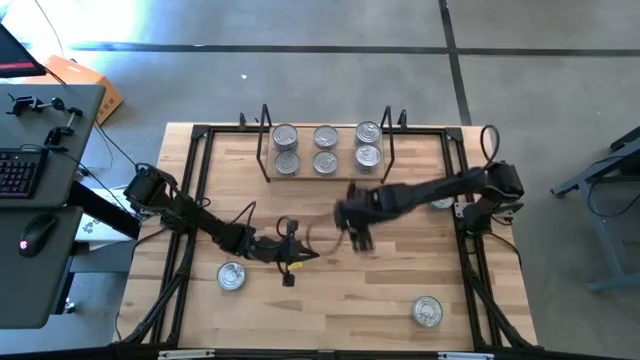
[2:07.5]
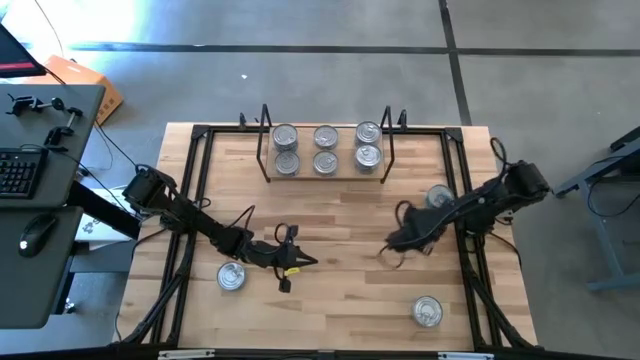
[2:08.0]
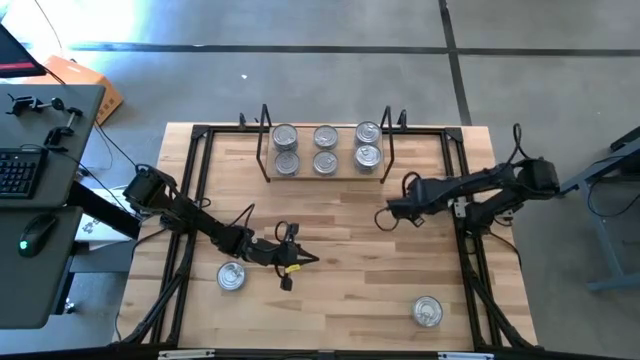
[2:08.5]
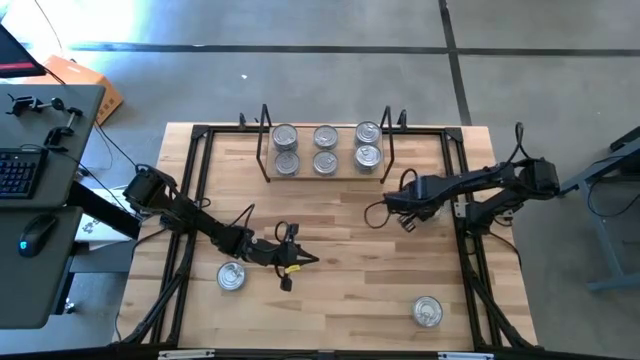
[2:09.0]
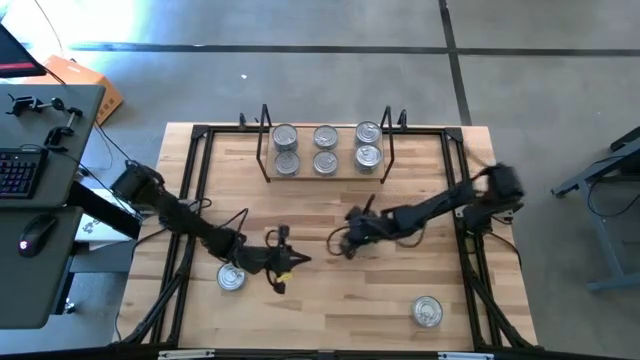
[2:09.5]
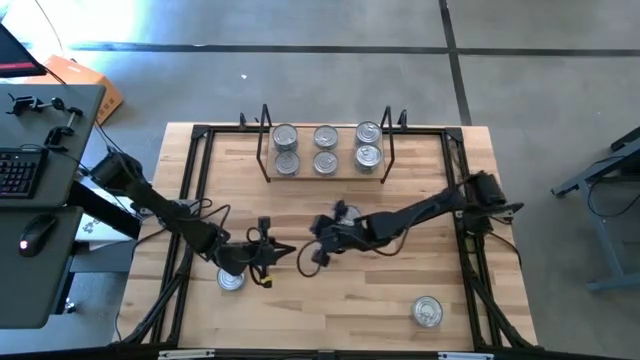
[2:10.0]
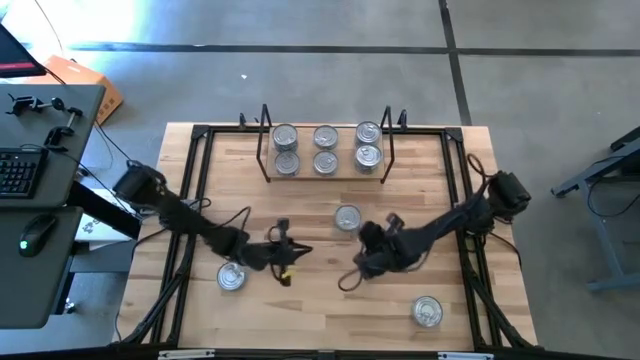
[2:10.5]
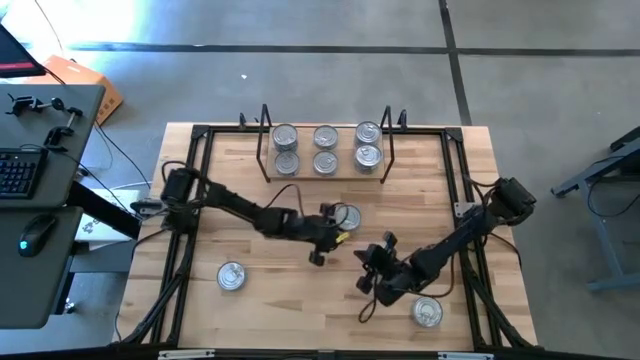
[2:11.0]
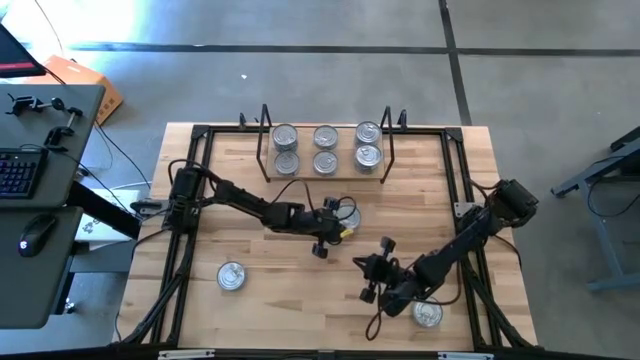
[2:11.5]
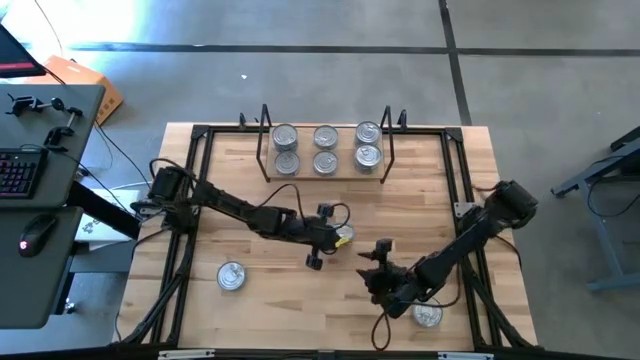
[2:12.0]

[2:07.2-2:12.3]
Task: Stack canned seafood by type on shelf
Stack the yellow and blue tuna can on top of the other yellow and blue tuna can on the shelf

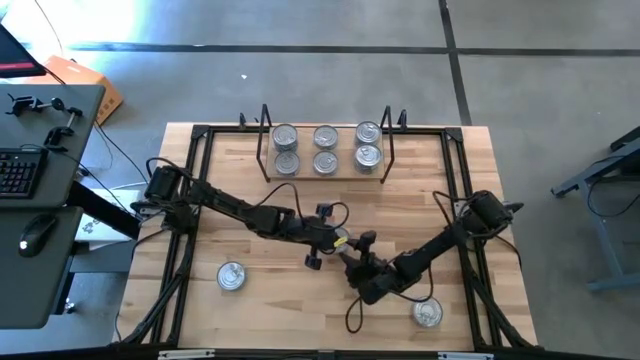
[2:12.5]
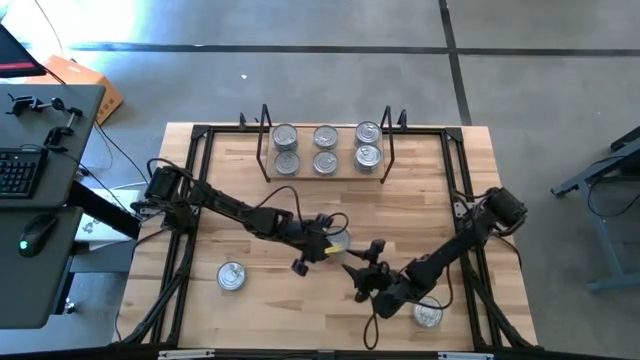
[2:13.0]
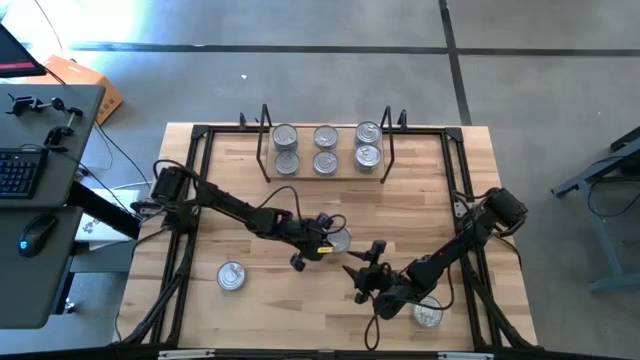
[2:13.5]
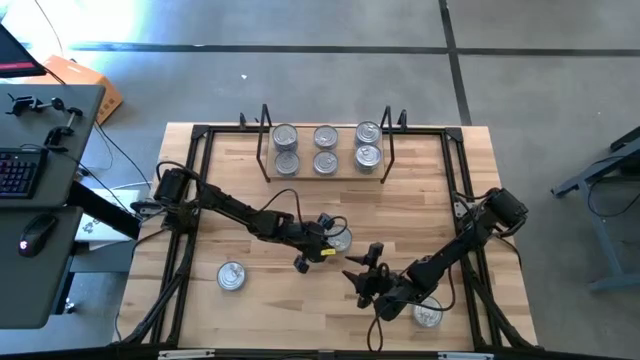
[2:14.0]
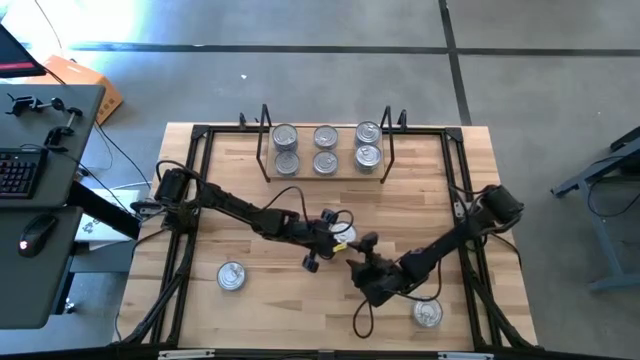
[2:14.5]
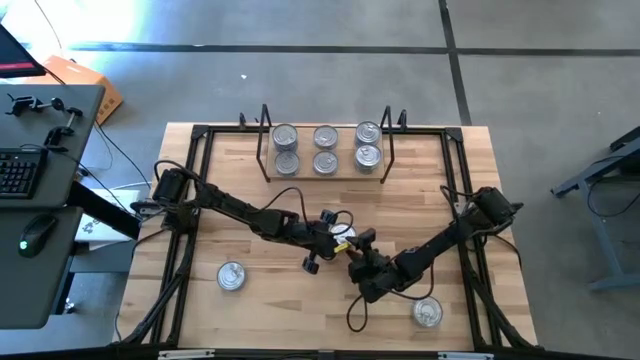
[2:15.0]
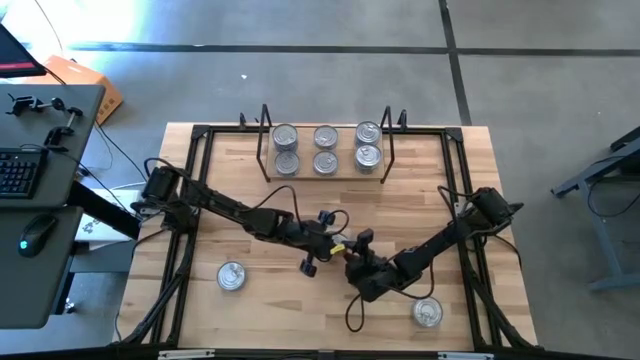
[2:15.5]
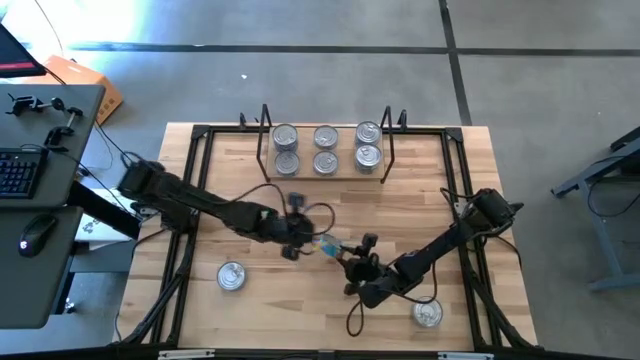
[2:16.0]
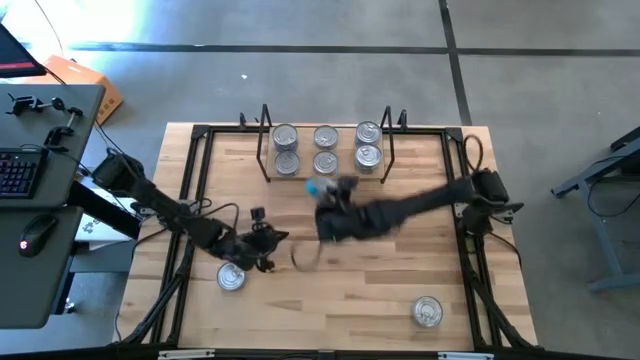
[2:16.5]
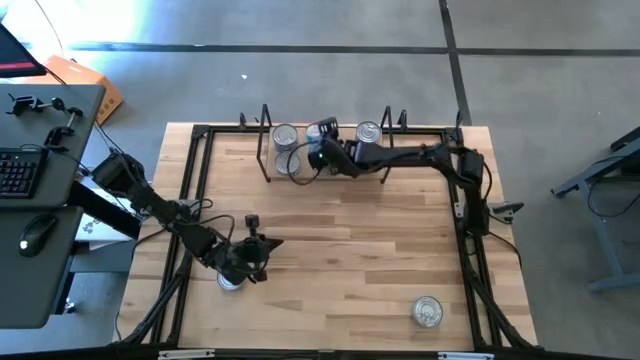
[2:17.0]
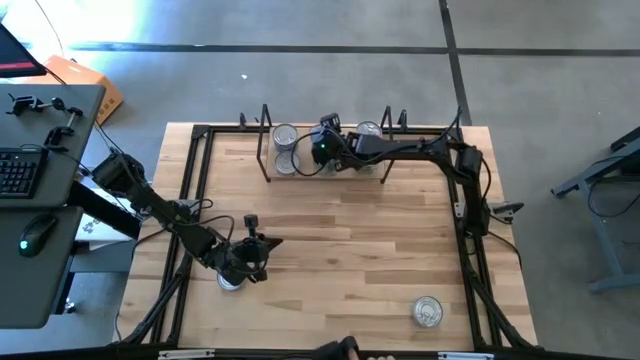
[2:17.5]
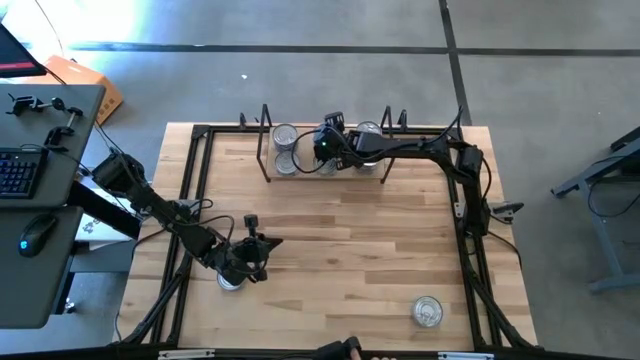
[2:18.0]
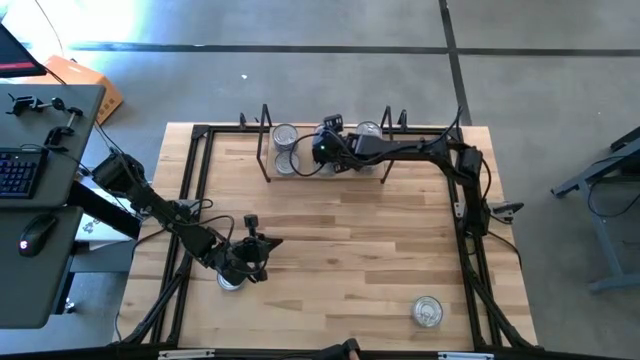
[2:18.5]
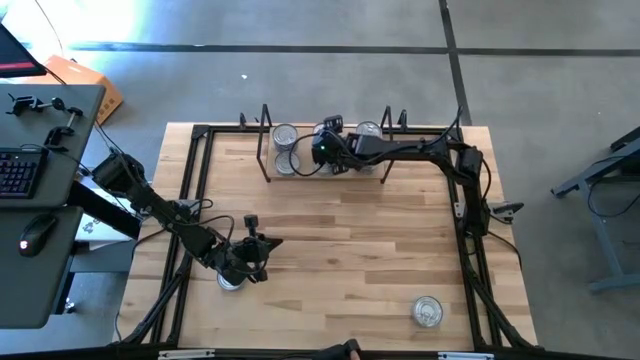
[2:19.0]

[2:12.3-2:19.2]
Stack the yellow and blue tuna can on top of the other yellow and blue tuna can on the shelf

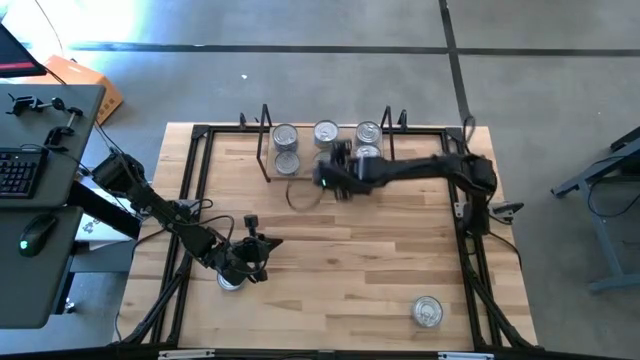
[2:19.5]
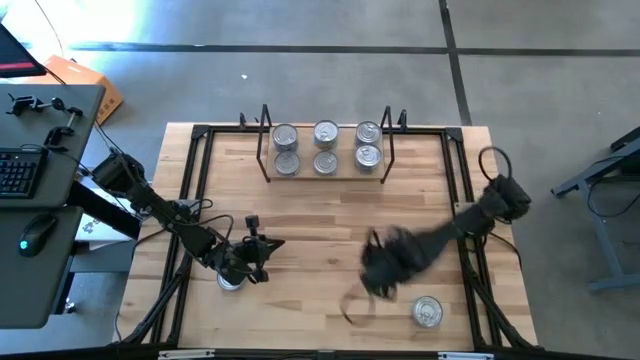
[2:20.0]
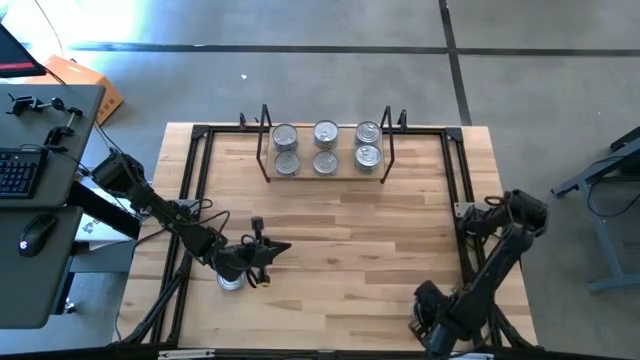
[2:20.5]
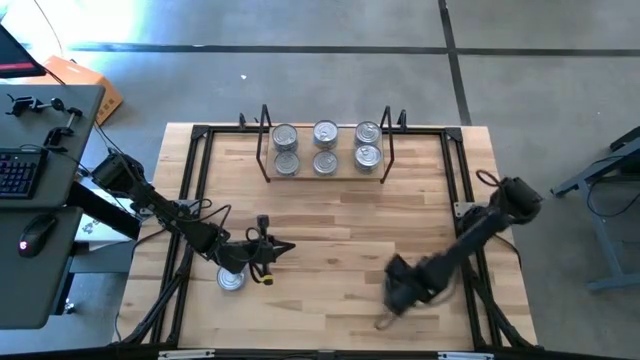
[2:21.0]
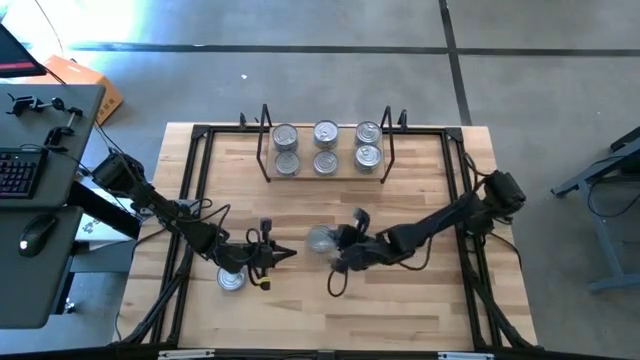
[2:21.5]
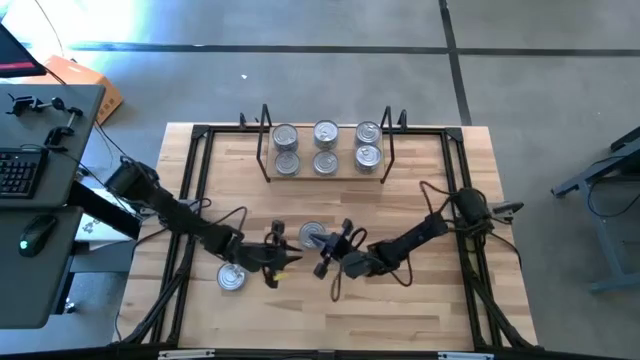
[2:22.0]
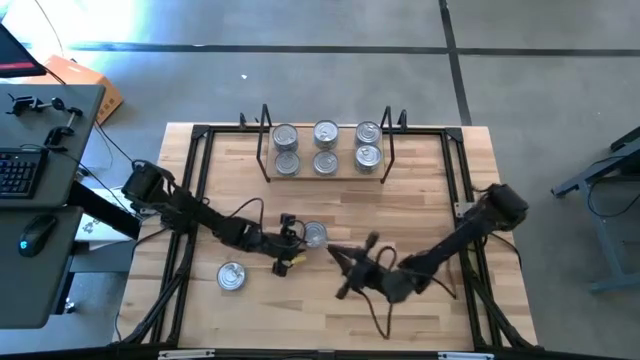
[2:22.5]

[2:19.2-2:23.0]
Stack the yellow and blue tuna can on top of the other yellow and blue tuna can on the shelf

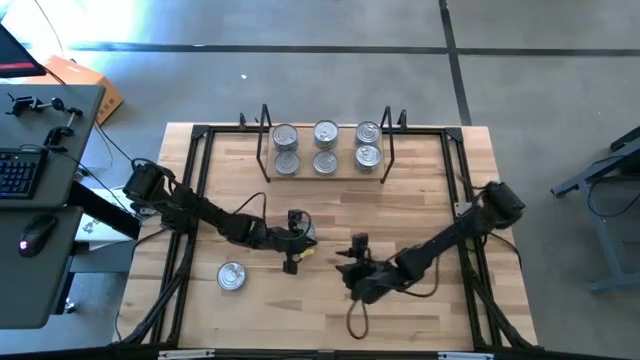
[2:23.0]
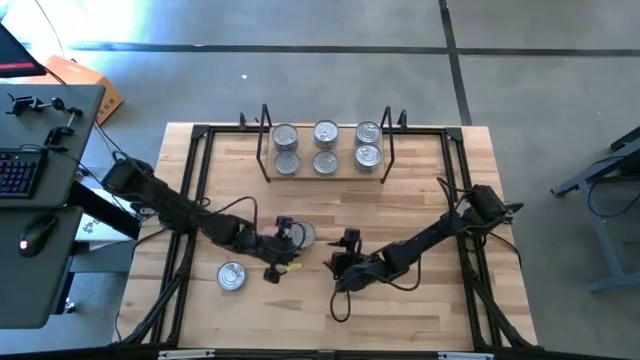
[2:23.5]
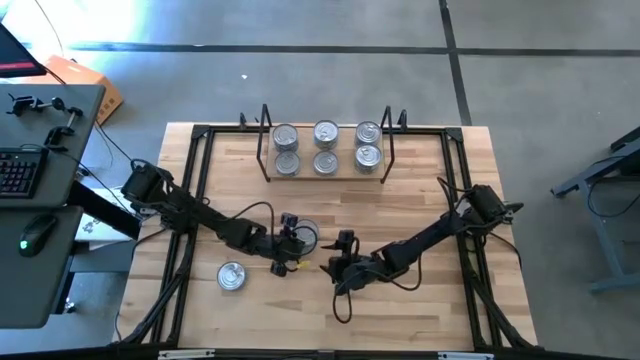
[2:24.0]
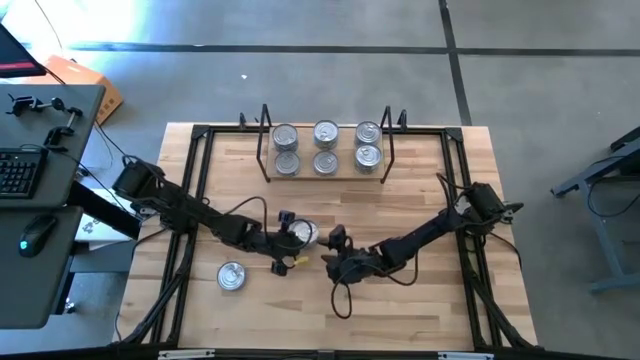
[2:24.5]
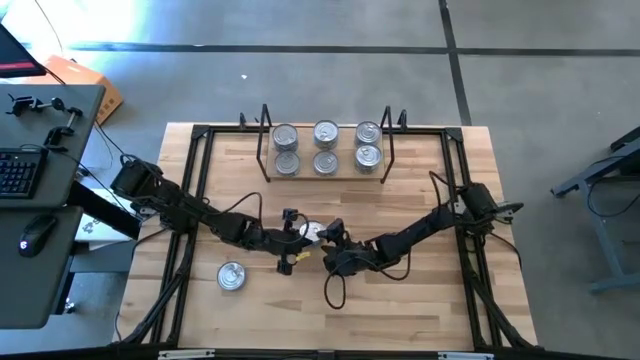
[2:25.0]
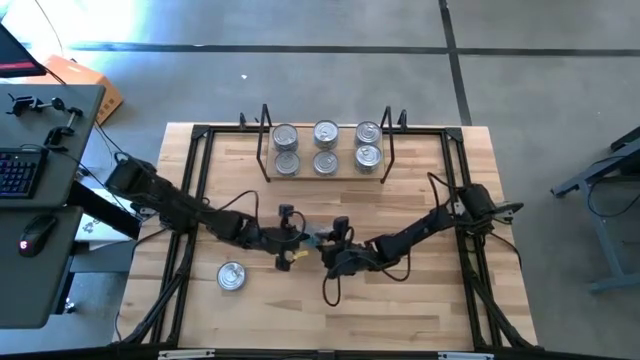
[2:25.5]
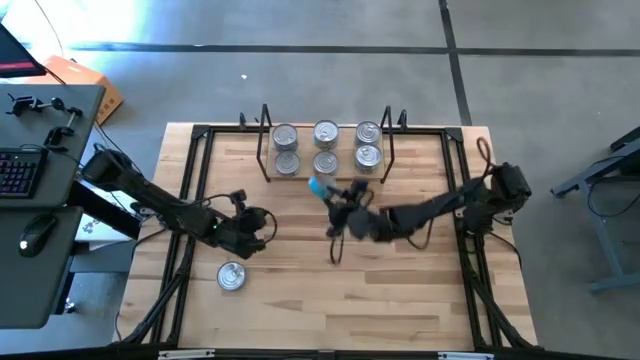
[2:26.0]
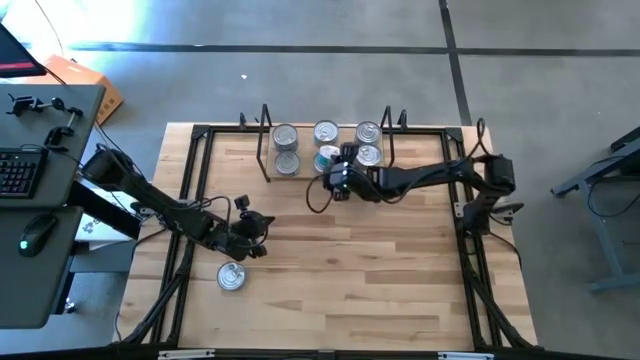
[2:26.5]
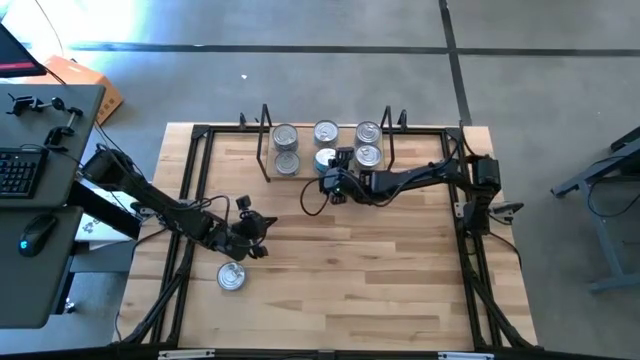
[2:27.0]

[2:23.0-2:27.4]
Stack the yellow and blue tuna can on top of the other yellow and blue tuna can on the shelf
